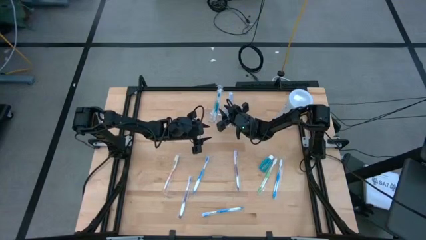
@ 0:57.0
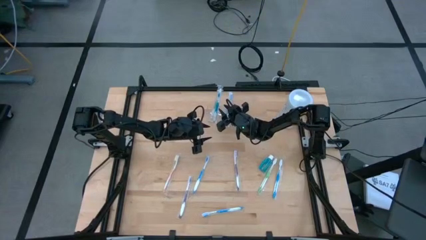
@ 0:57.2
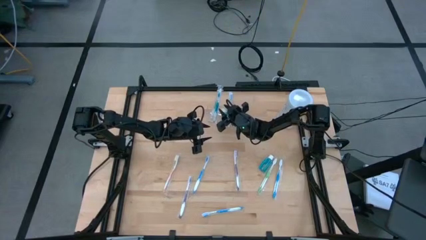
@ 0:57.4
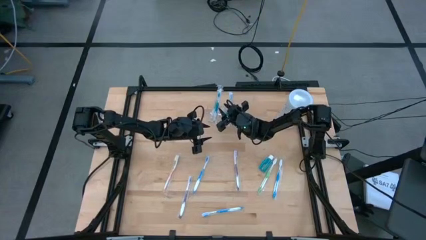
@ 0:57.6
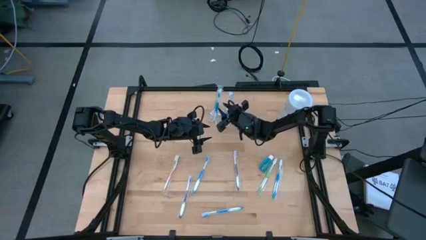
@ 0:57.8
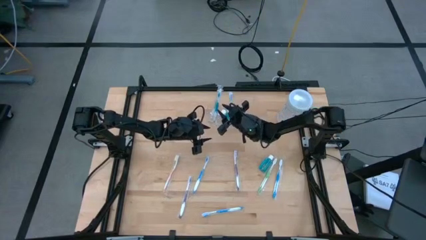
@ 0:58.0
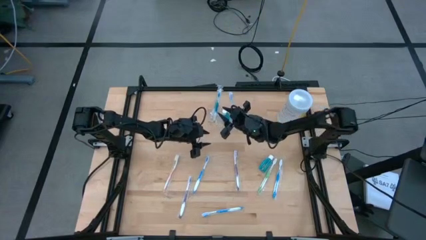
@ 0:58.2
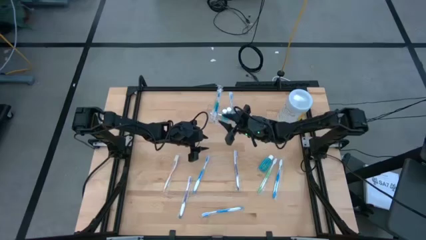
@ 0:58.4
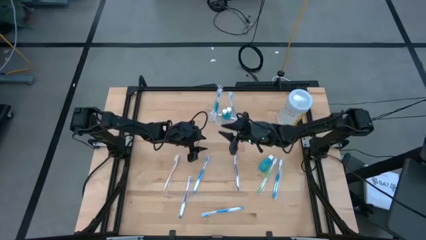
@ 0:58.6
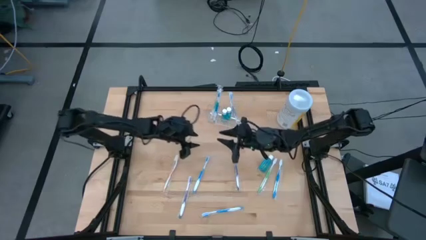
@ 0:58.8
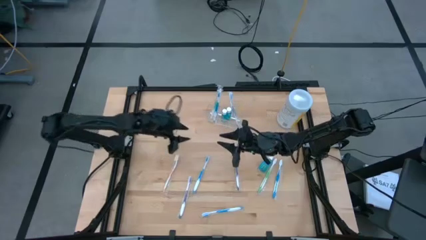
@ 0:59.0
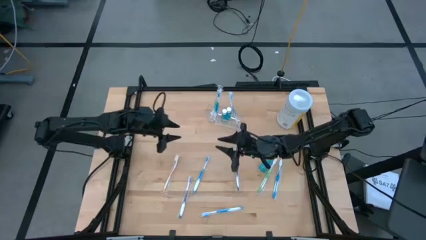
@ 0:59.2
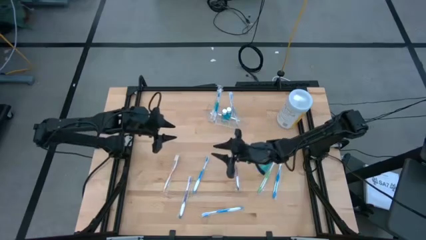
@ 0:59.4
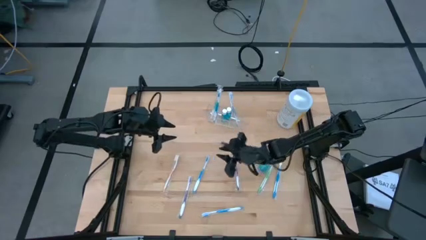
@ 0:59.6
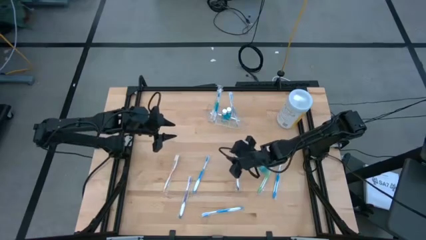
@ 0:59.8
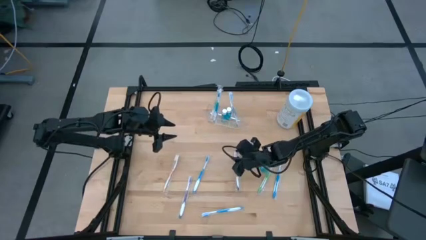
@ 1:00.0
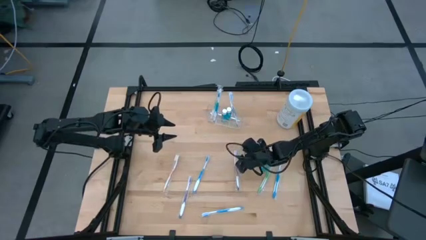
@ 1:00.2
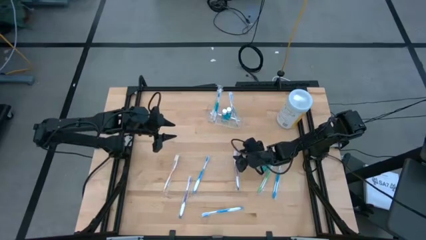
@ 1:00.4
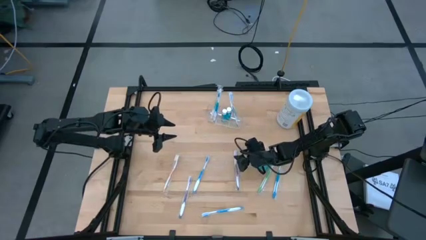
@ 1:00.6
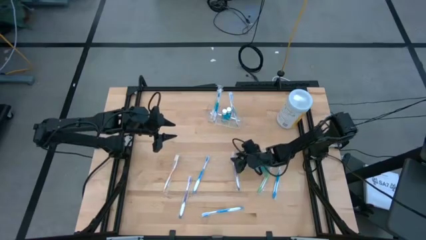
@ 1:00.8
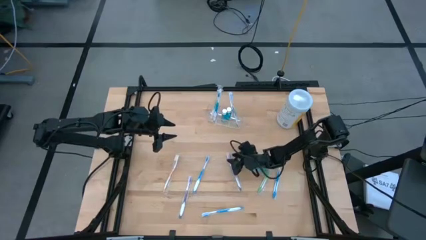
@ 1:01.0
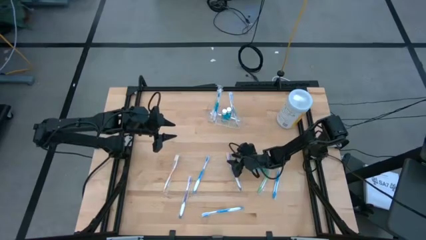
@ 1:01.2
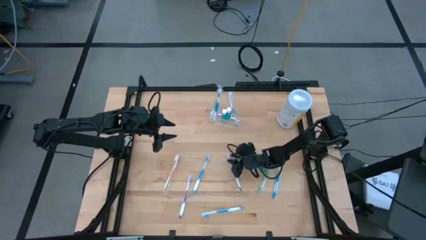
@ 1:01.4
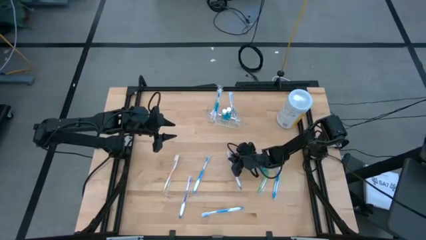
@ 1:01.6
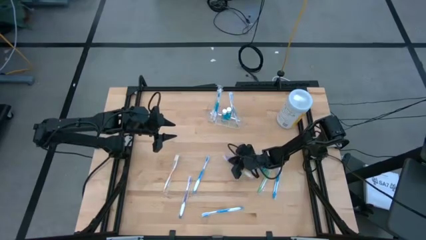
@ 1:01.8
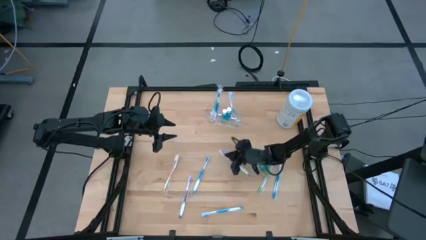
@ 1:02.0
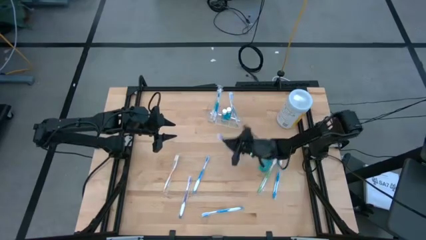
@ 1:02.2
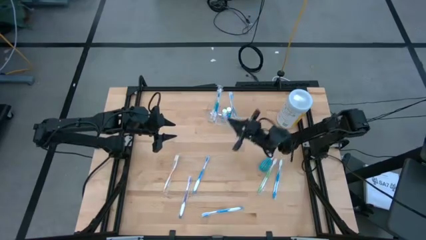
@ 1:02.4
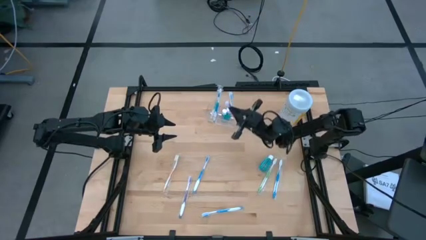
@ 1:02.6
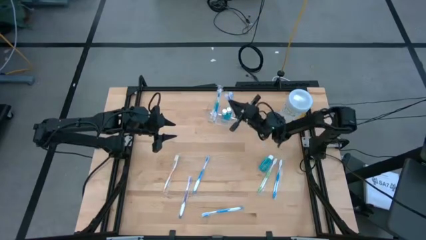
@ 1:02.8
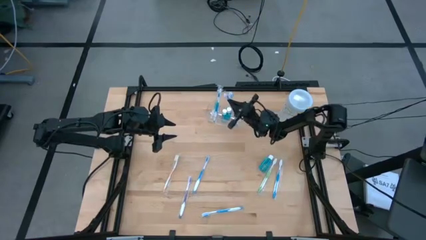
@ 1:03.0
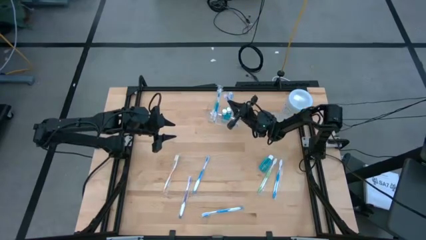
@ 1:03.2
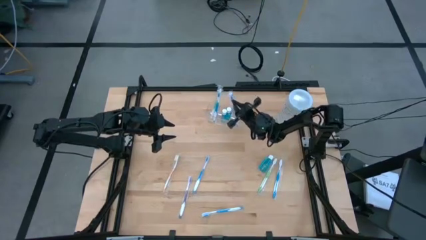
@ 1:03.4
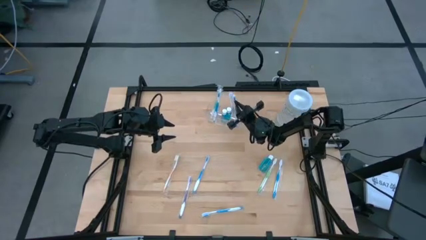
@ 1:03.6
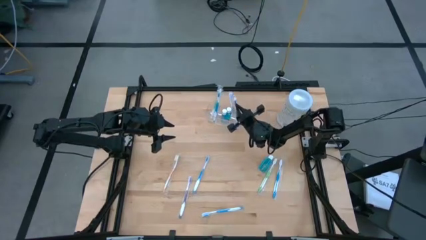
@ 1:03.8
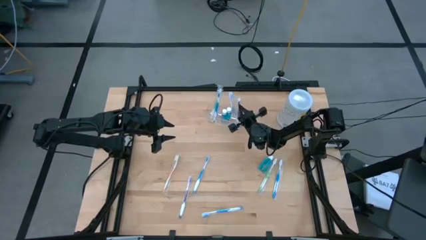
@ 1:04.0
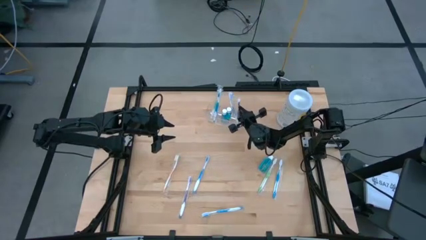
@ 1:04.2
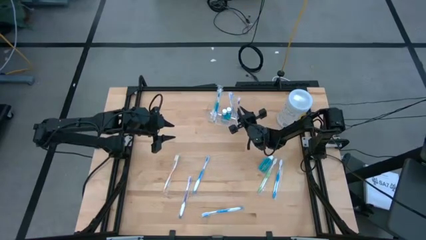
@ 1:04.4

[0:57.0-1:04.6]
Task: Pick & Place toothbrushing station
Put the right purple toothbrush into the right section of the transparent organizer

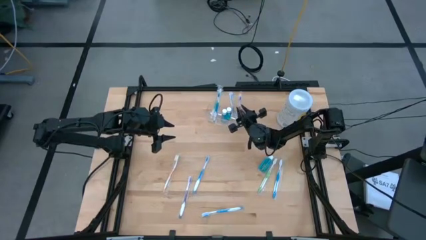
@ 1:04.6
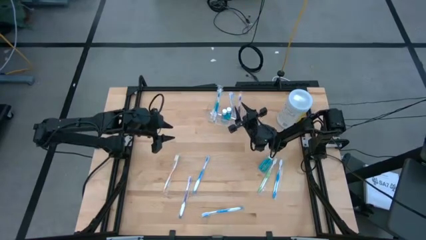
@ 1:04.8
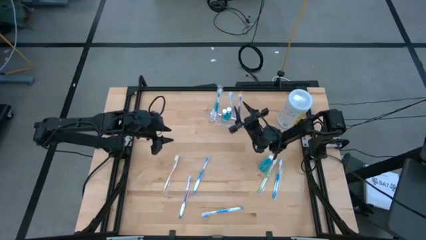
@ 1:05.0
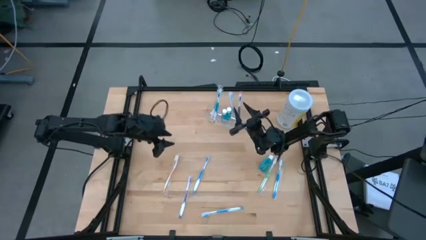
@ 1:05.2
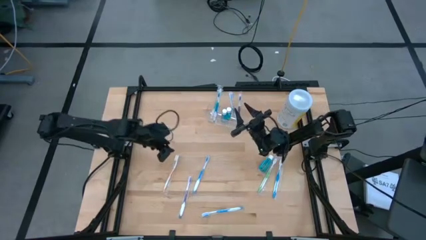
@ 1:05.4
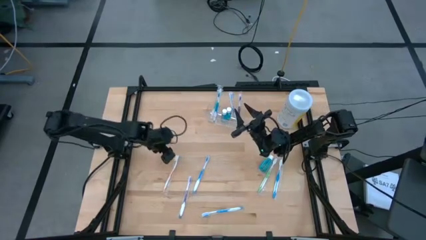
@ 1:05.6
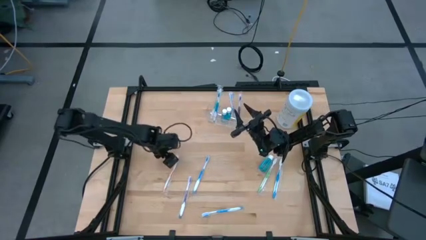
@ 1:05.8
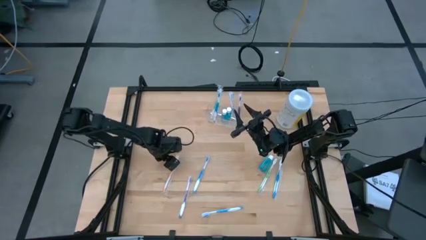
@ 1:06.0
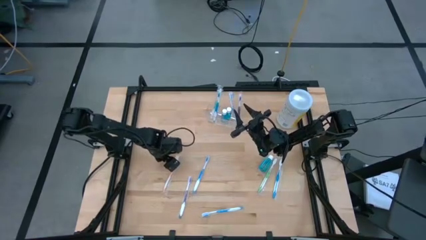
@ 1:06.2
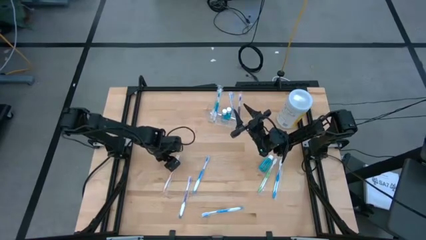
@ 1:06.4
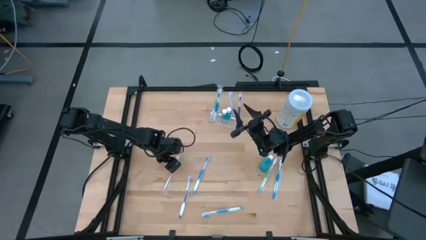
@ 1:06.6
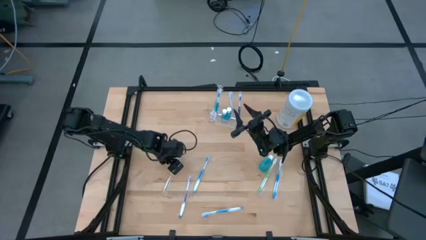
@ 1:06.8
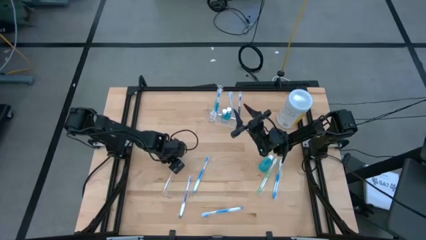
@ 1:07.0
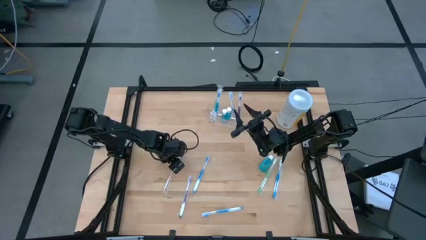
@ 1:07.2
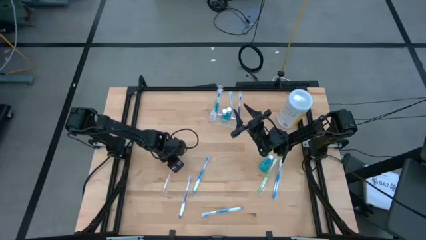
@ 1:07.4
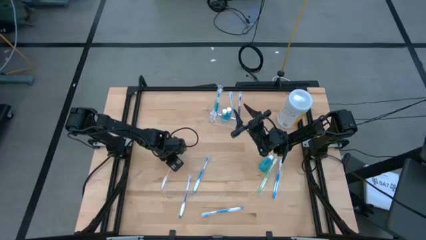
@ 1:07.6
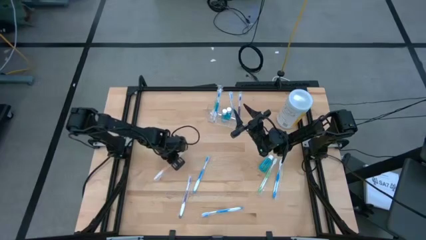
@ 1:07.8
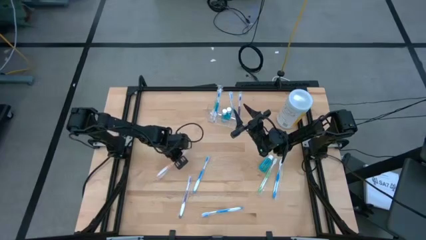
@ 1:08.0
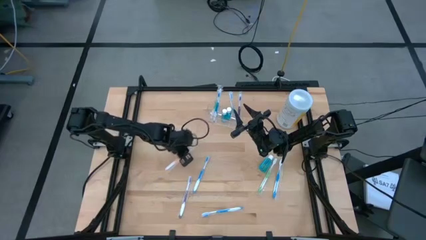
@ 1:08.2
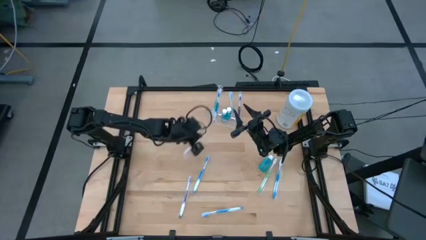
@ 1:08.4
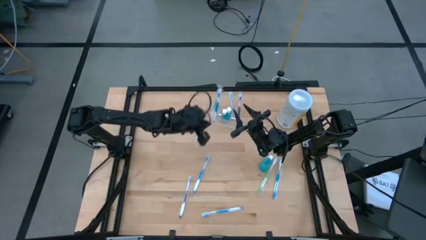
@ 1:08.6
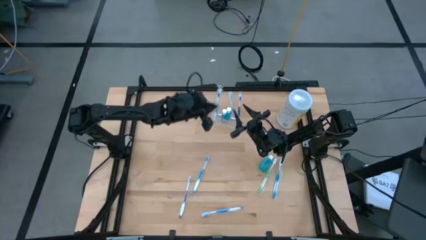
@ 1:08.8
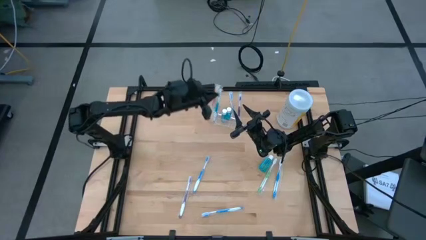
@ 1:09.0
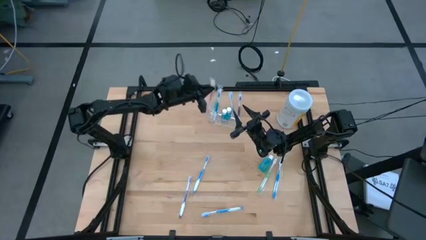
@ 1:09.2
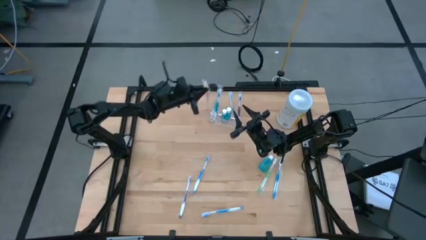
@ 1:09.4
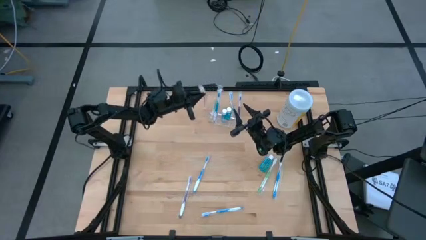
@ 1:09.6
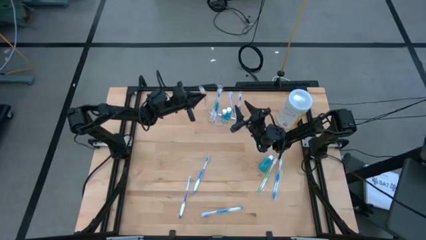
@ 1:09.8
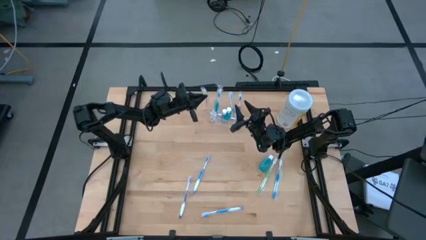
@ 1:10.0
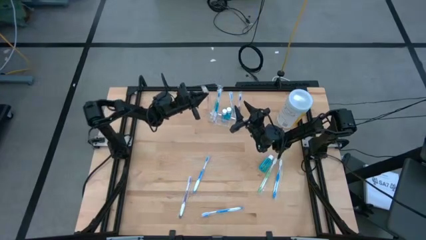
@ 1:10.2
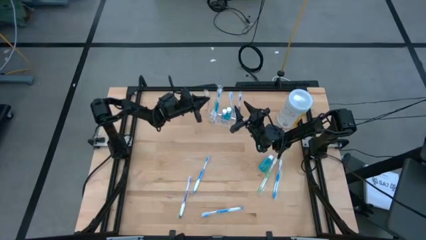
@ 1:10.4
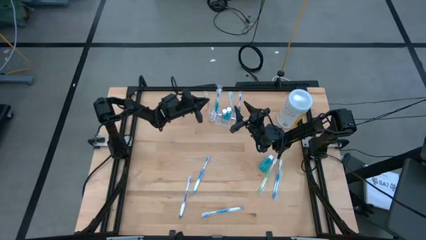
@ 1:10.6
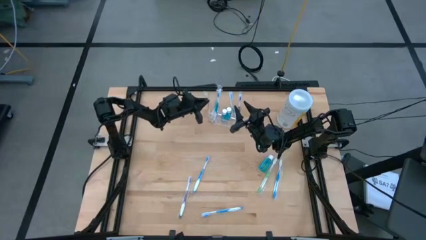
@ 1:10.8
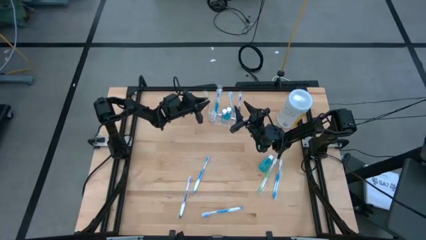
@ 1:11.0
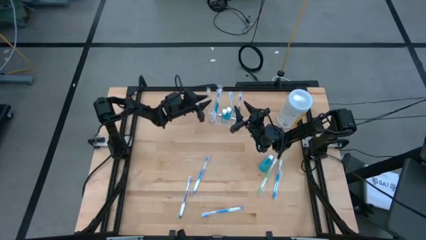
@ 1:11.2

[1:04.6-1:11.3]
Put the orange toothbrush into the left section of the transparent organizer
